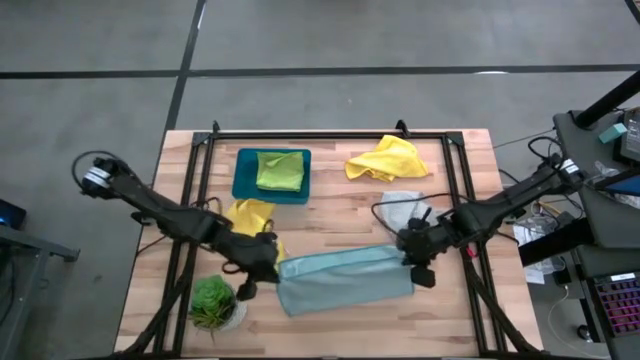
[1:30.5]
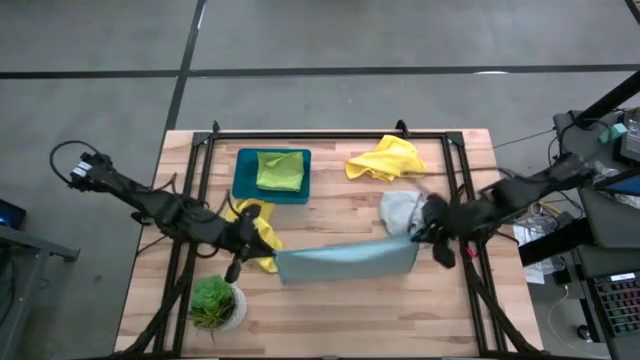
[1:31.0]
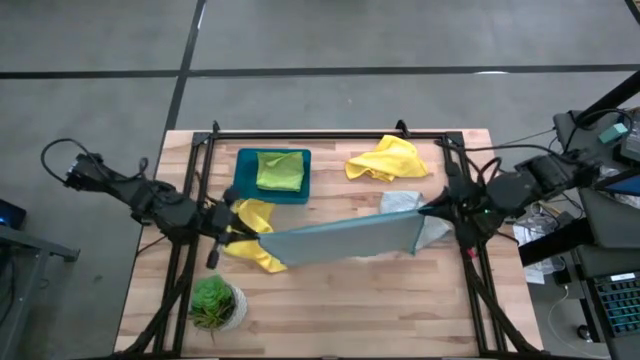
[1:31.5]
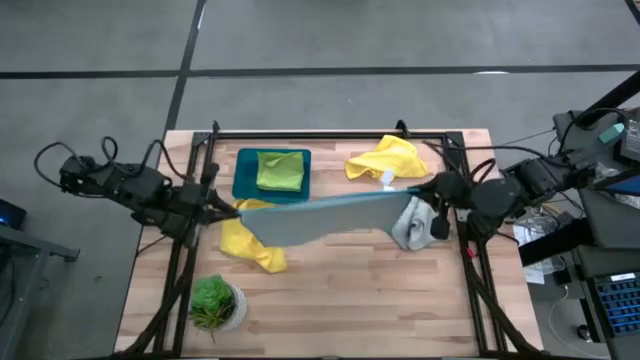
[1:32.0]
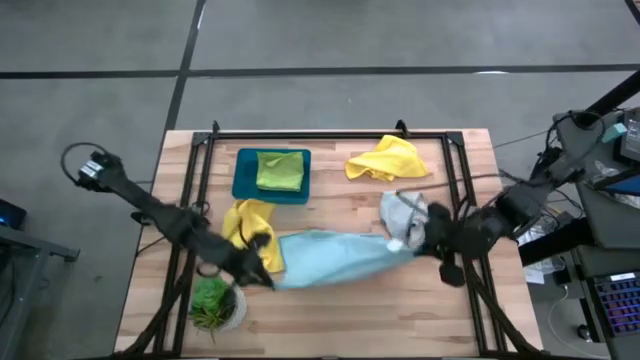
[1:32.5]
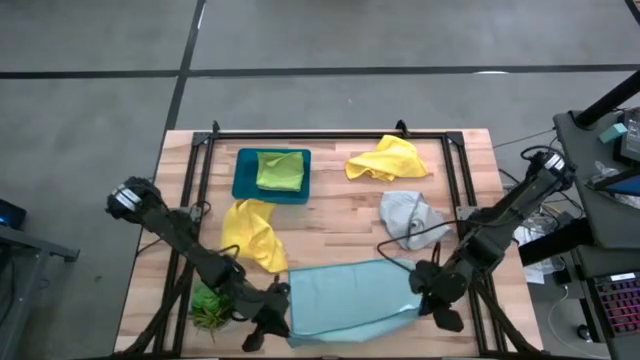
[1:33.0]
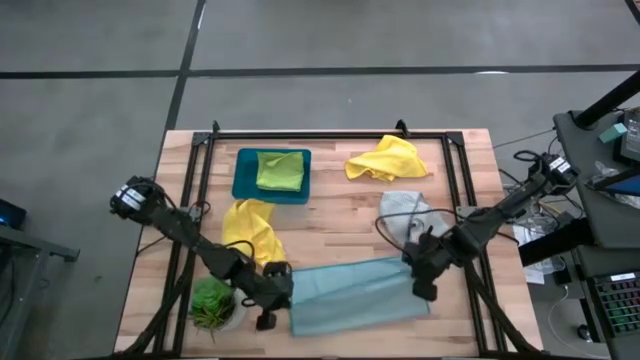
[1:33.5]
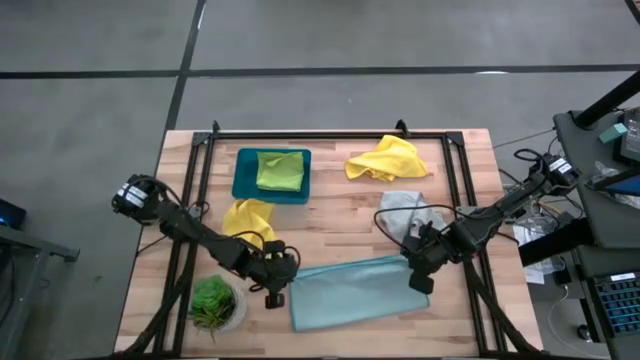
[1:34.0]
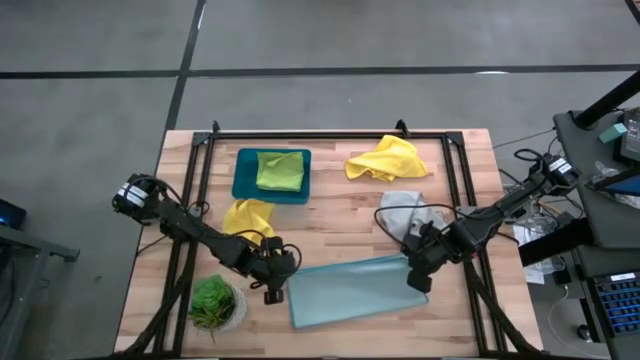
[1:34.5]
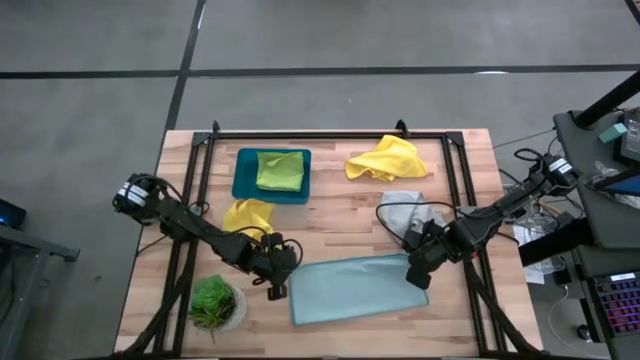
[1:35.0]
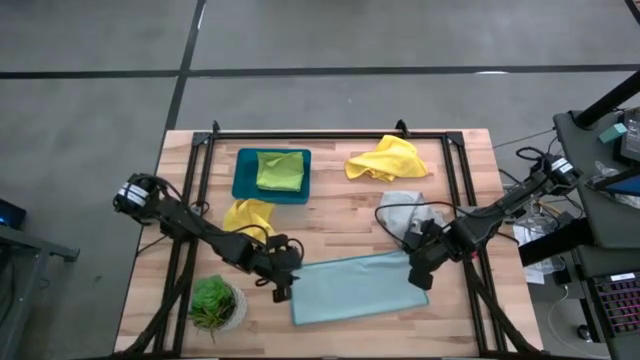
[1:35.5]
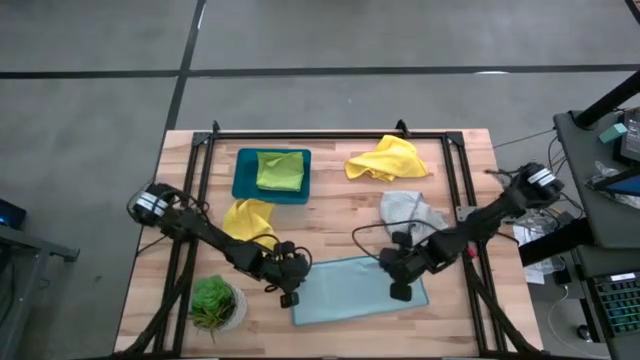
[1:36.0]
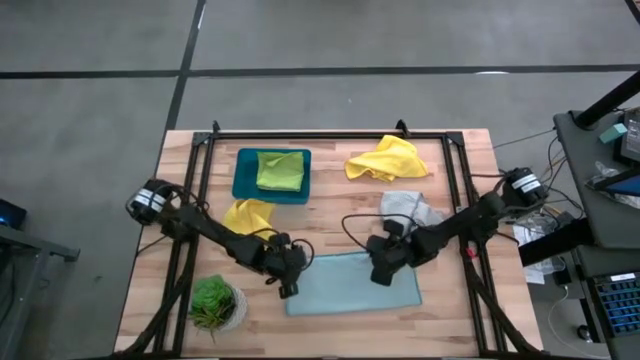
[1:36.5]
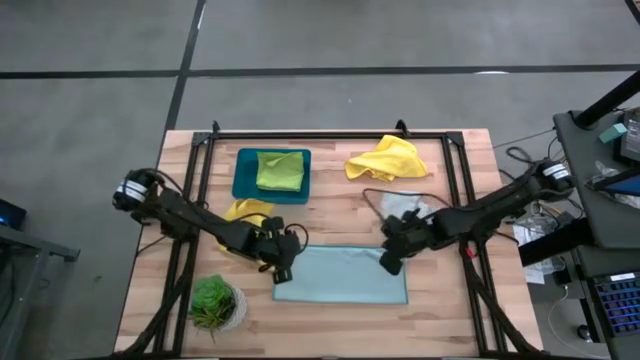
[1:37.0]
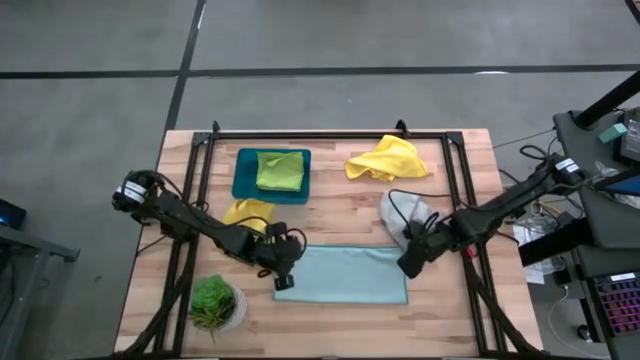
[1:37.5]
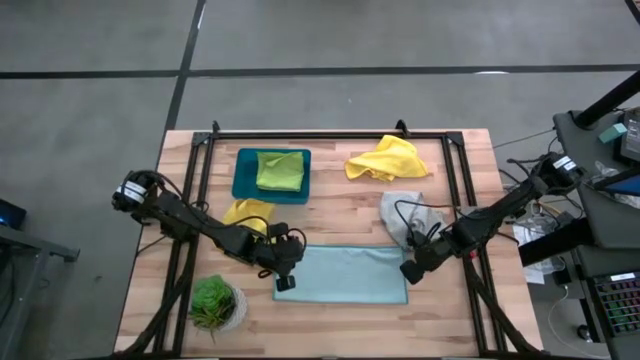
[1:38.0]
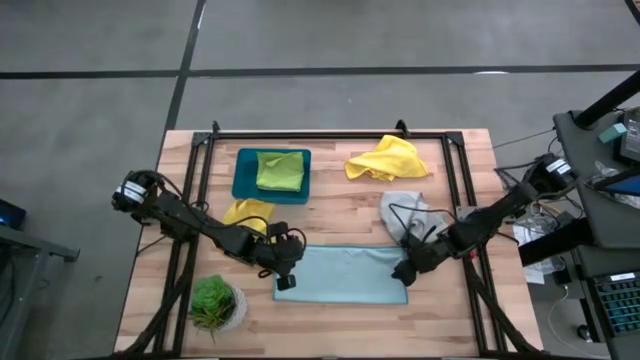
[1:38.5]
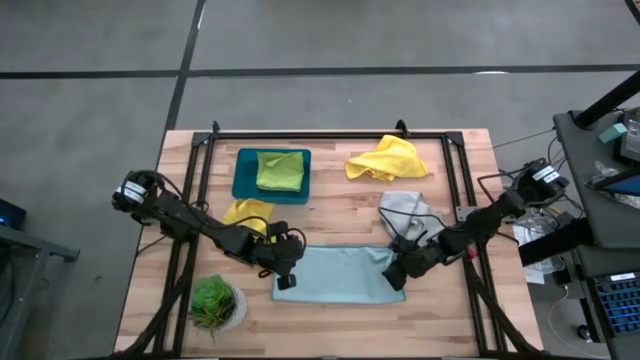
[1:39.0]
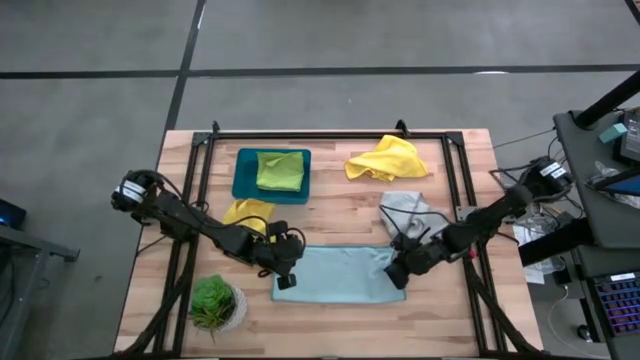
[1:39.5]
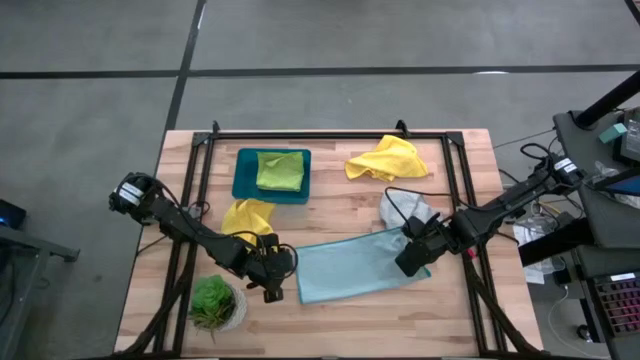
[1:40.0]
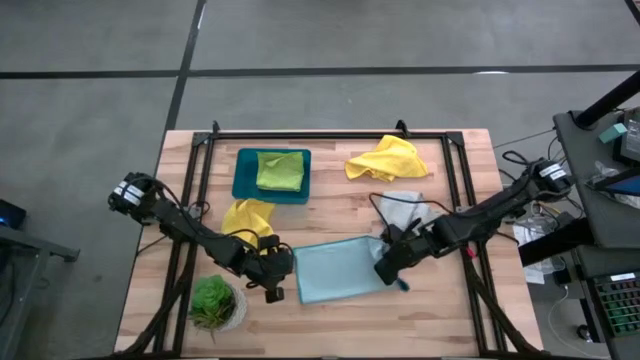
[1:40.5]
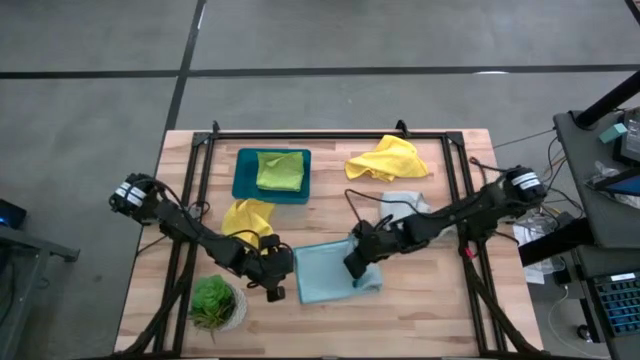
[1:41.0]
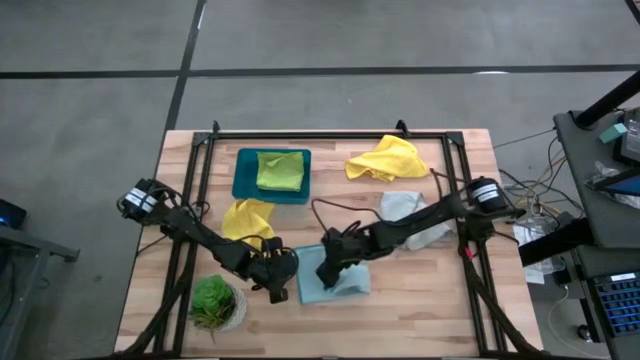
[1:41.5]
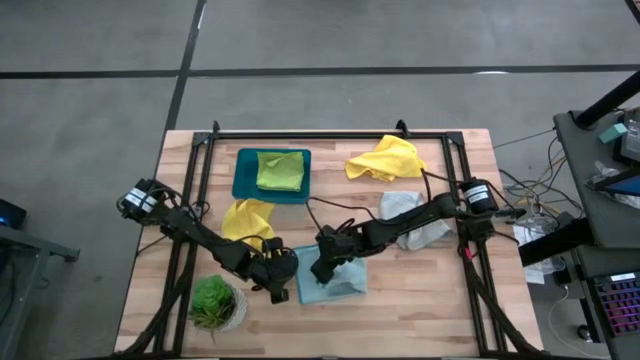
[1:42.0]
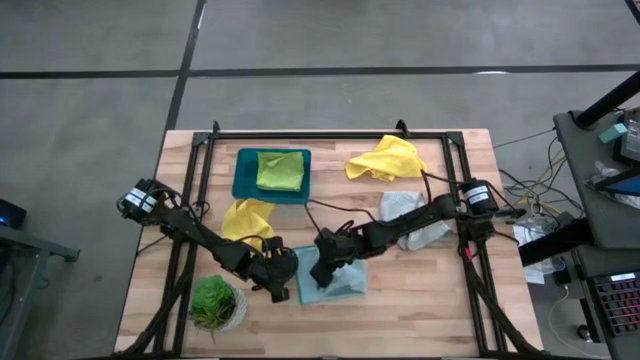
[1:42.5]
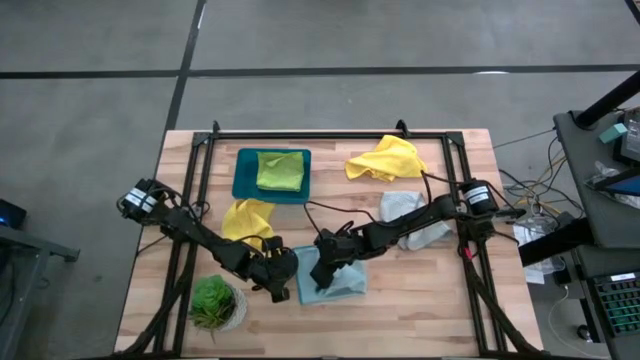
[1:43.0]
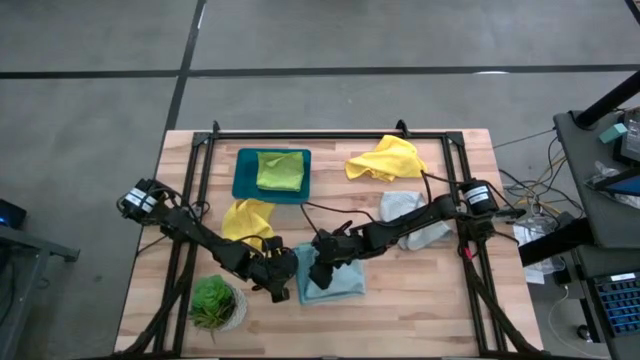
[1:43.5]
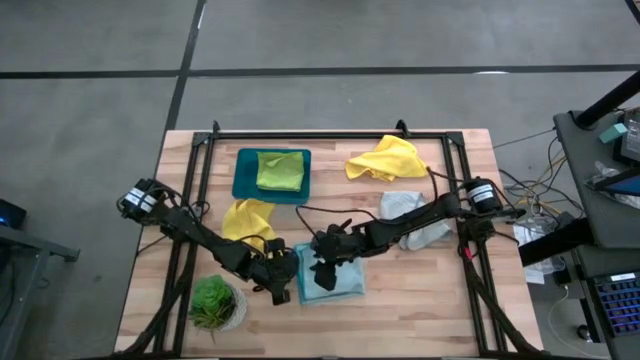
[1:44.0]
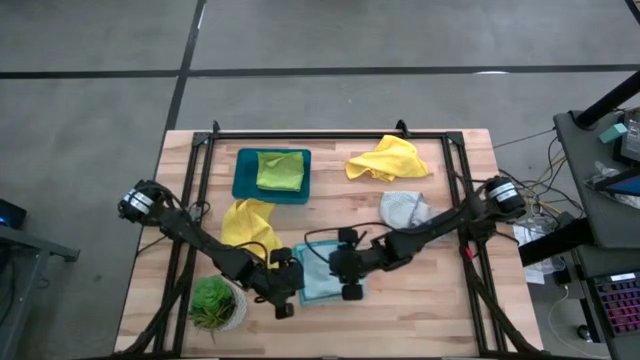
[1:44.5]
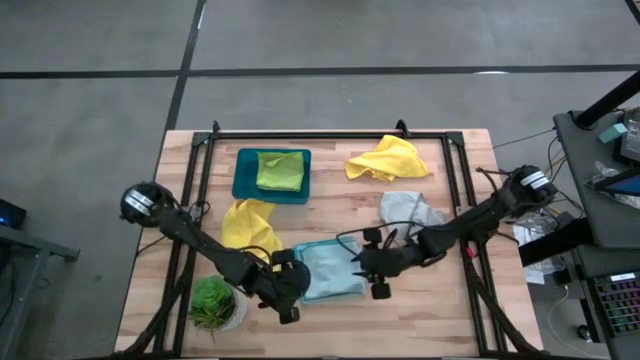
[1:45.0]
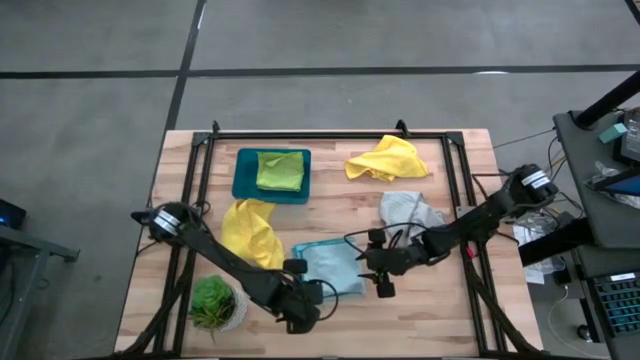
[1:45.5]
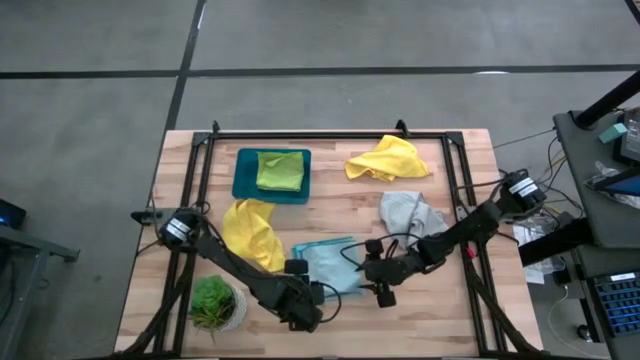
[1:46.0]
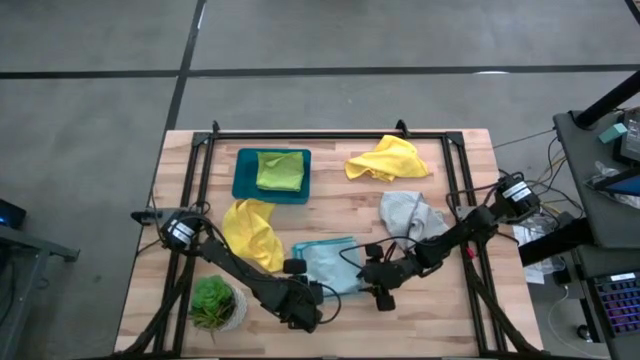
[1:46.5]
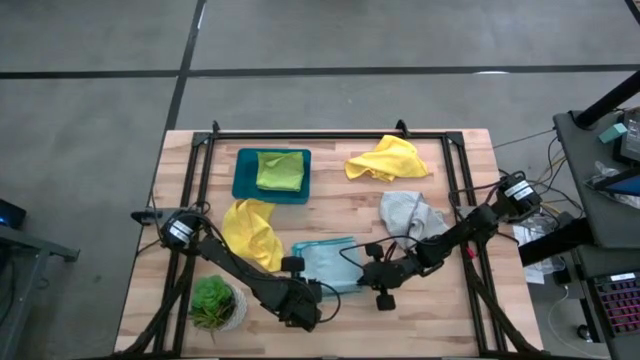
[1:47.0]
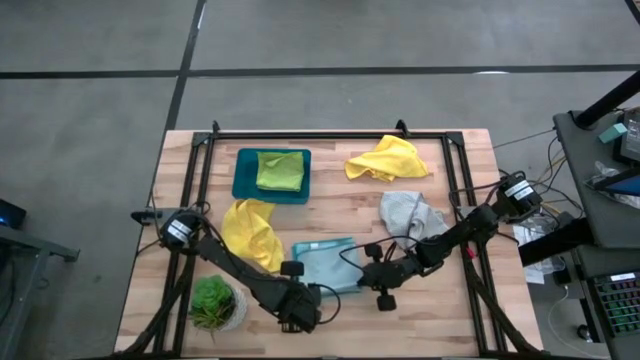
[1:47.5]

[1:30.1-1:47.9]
Task: Fold microfiber towels
Fold the blue microfiber towel

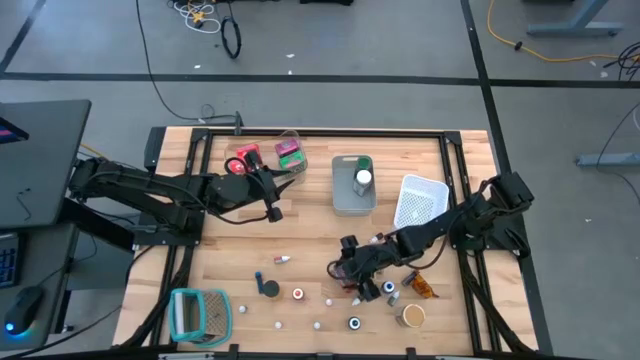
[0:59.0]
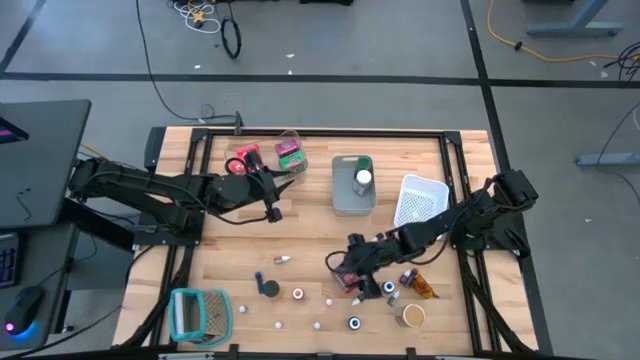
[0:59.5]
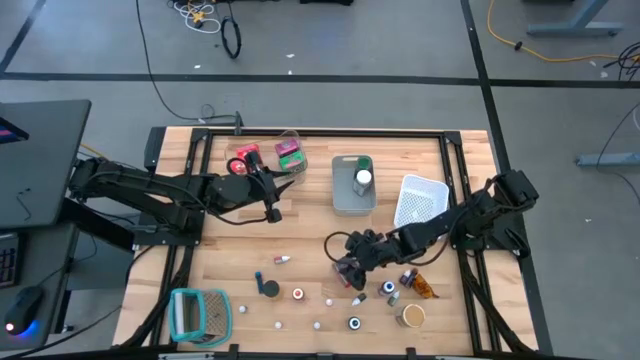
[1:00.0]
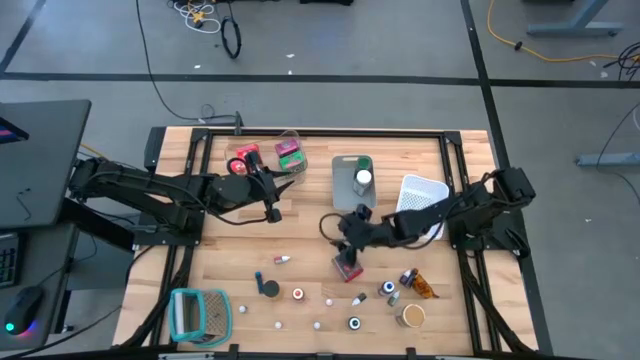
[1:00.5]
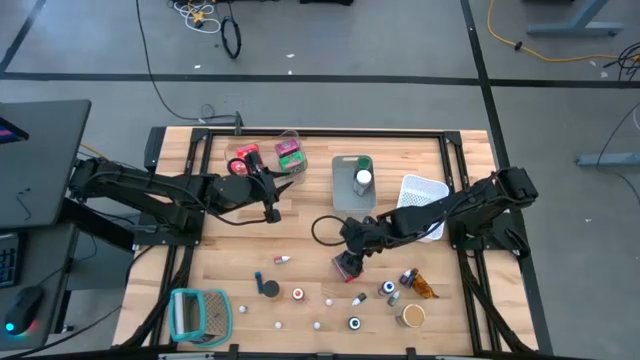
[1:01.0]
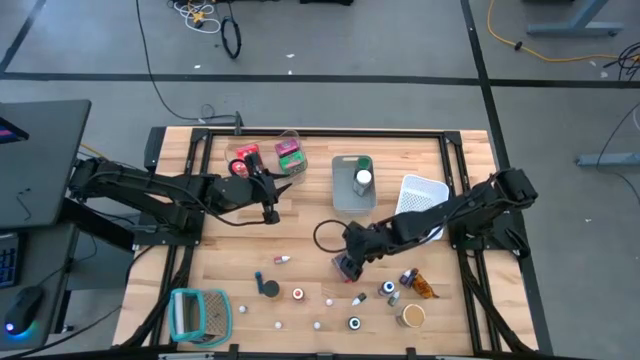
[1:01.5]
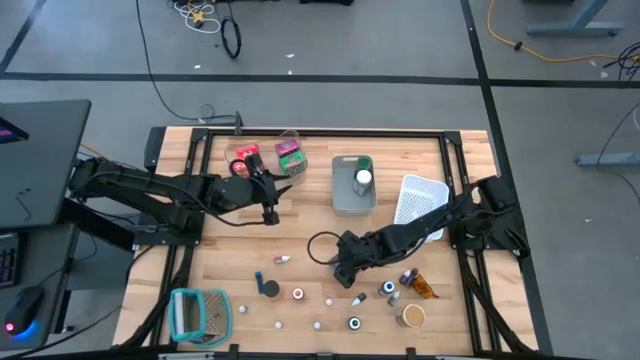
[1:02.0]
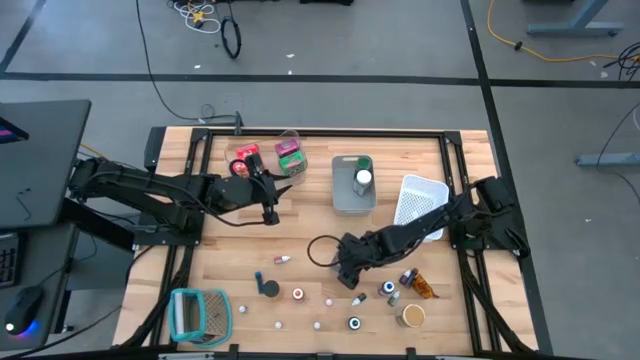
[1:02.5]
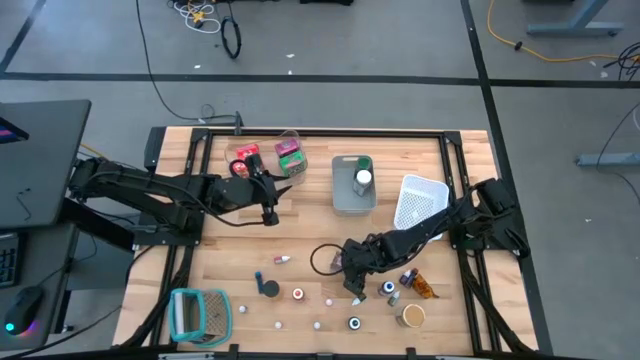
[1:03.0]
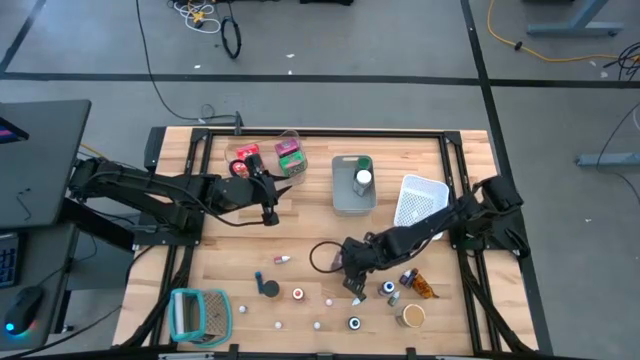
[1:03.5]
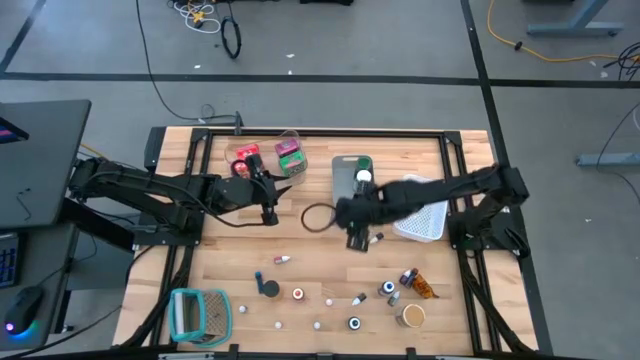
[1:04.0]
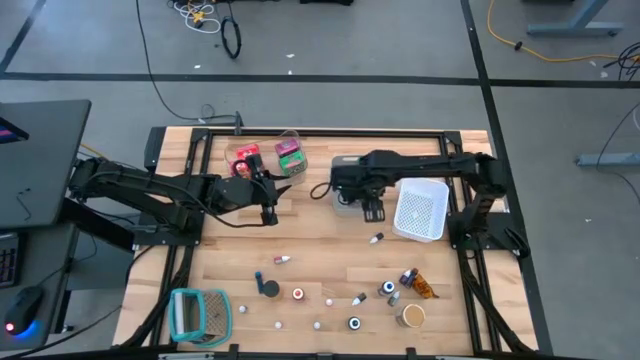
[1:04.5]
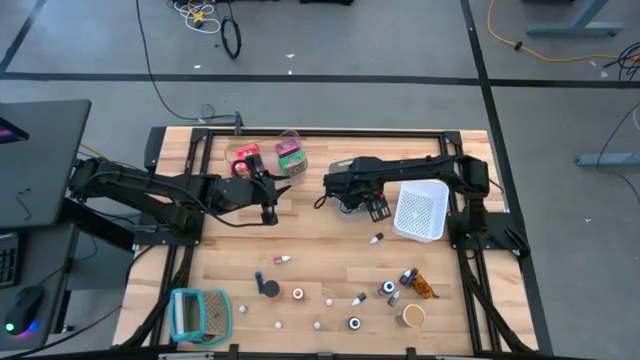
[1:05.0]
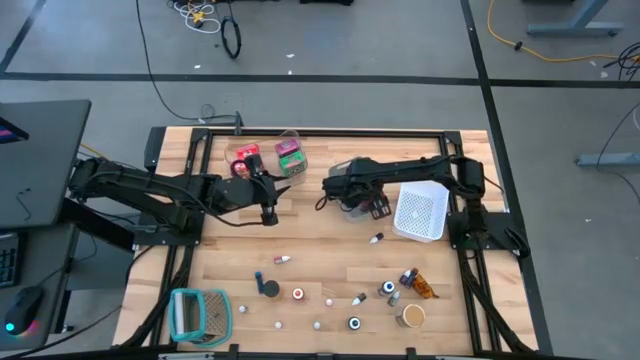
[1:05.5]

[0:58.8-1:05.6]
Task: Pick & Place Kitchen Items
Put the red spice can into the gray bin
